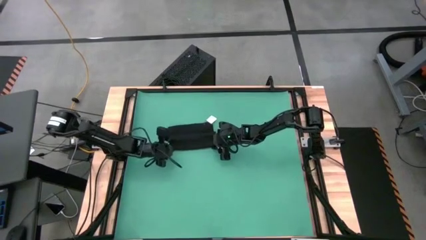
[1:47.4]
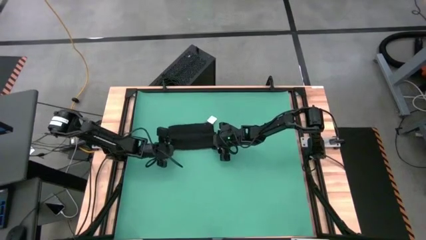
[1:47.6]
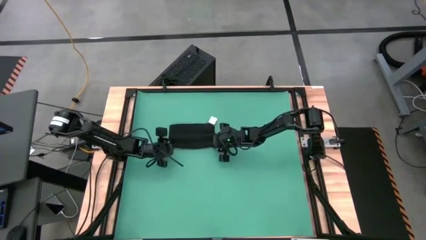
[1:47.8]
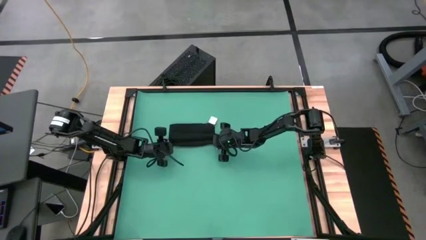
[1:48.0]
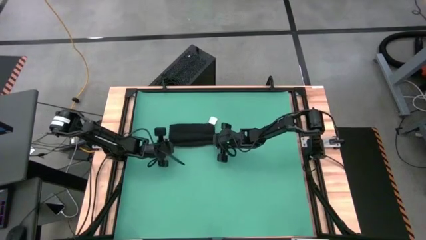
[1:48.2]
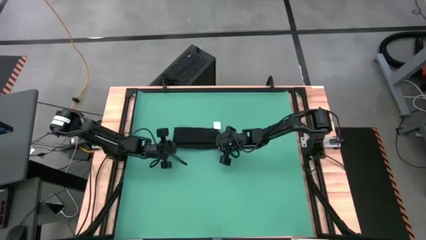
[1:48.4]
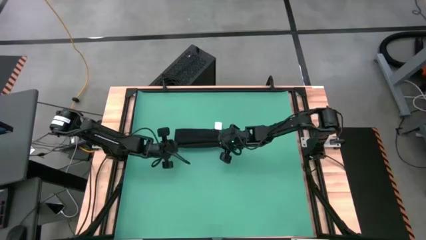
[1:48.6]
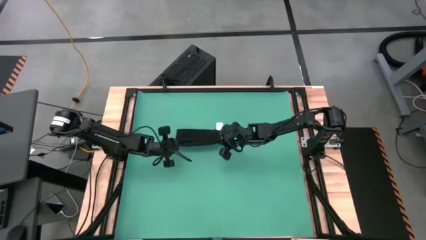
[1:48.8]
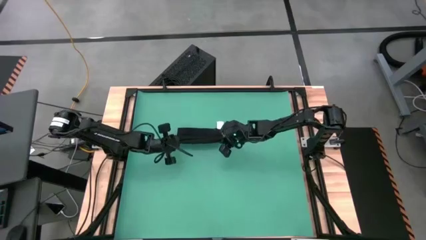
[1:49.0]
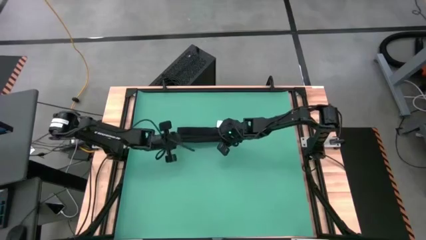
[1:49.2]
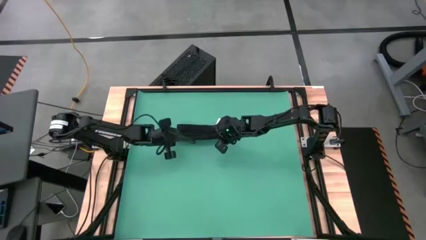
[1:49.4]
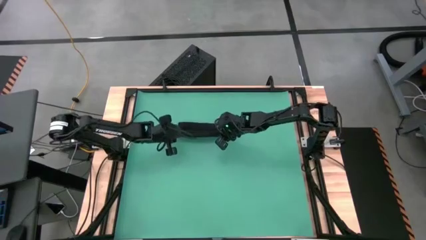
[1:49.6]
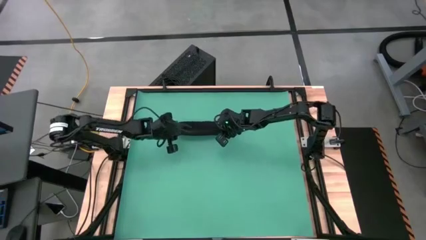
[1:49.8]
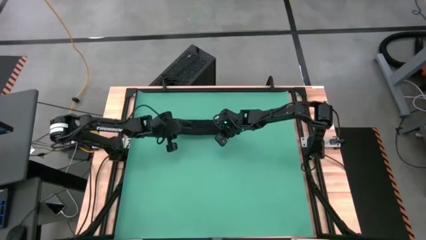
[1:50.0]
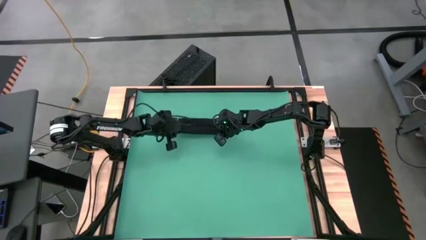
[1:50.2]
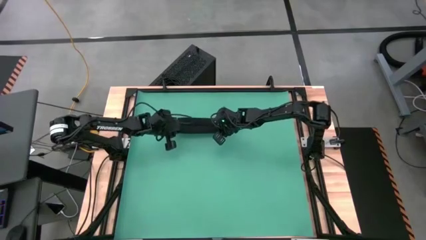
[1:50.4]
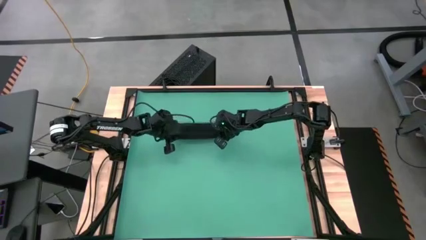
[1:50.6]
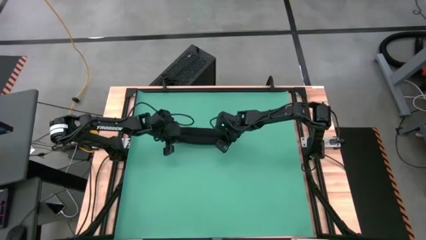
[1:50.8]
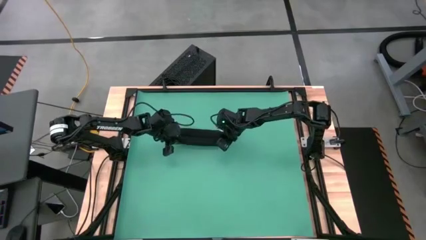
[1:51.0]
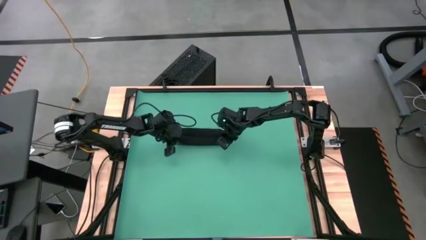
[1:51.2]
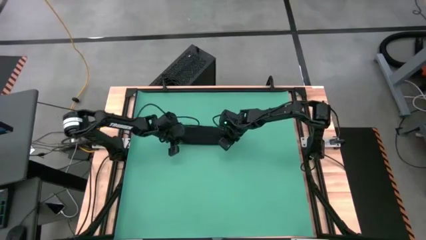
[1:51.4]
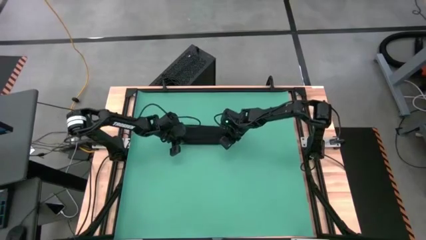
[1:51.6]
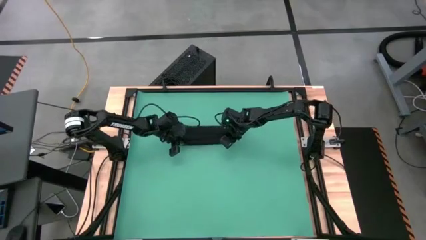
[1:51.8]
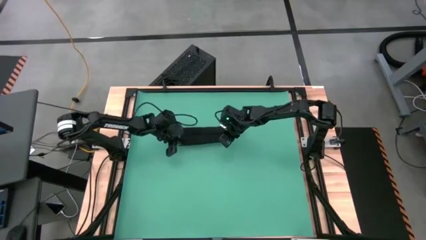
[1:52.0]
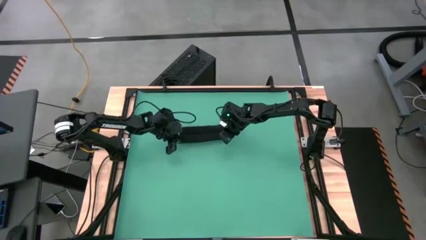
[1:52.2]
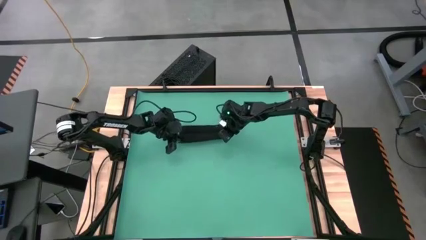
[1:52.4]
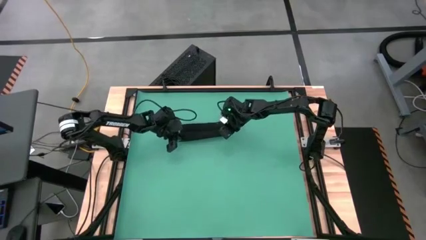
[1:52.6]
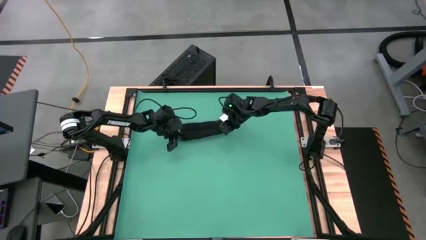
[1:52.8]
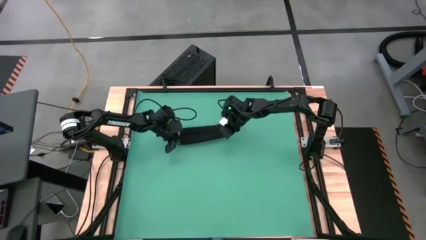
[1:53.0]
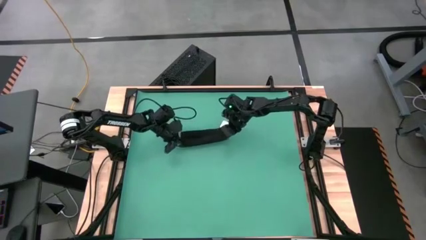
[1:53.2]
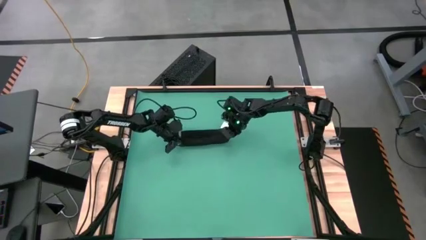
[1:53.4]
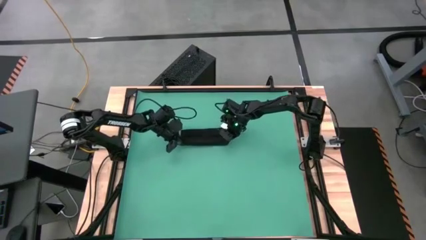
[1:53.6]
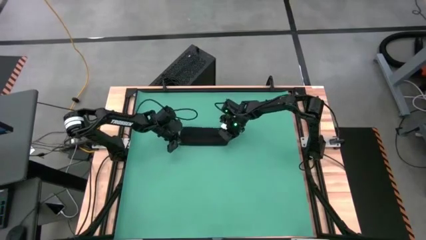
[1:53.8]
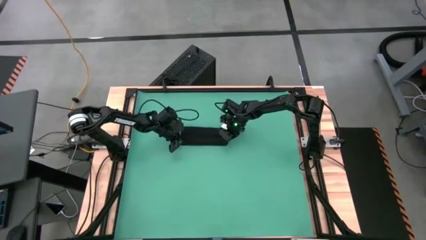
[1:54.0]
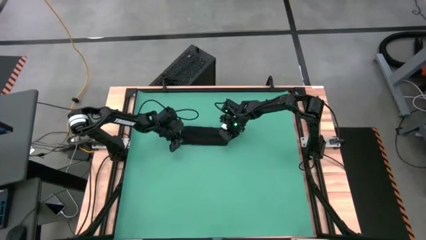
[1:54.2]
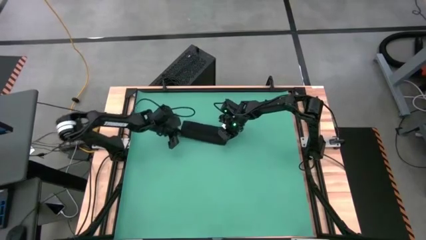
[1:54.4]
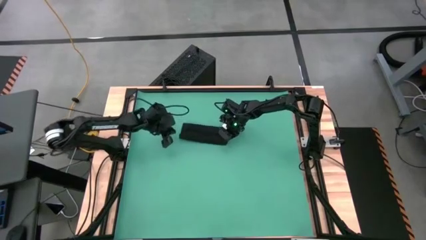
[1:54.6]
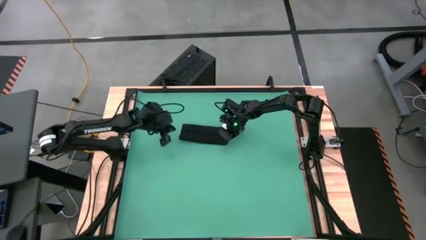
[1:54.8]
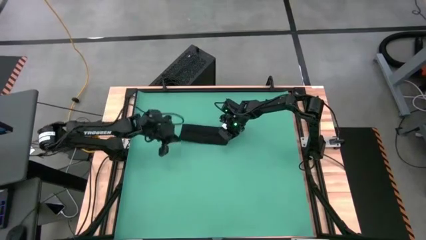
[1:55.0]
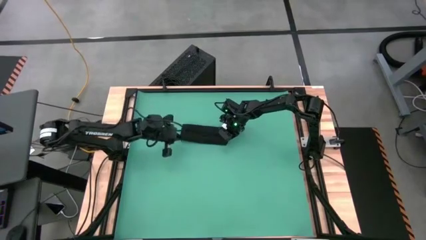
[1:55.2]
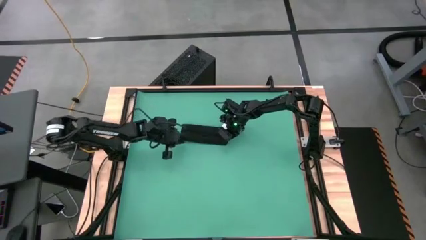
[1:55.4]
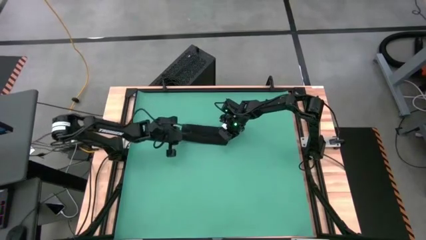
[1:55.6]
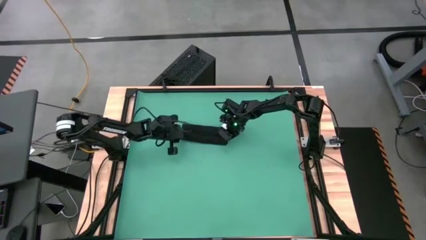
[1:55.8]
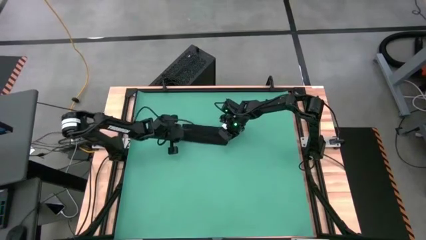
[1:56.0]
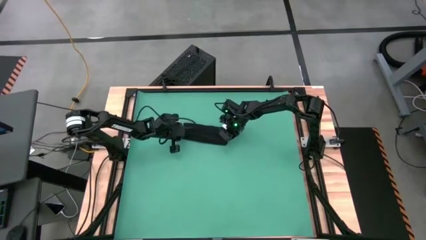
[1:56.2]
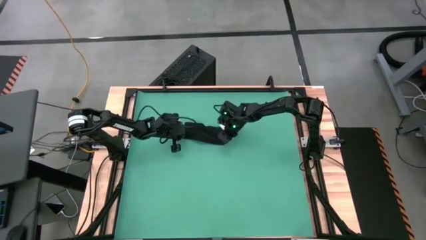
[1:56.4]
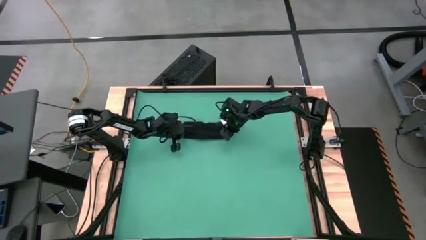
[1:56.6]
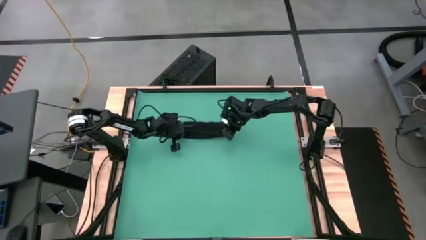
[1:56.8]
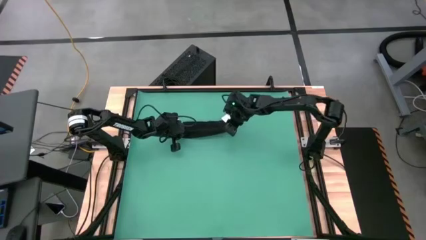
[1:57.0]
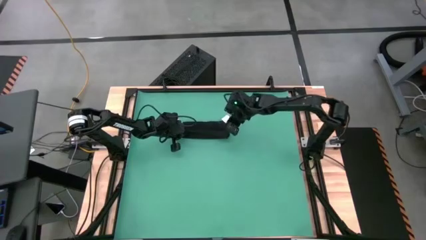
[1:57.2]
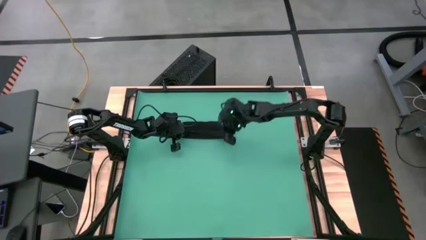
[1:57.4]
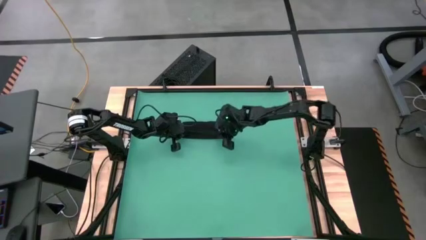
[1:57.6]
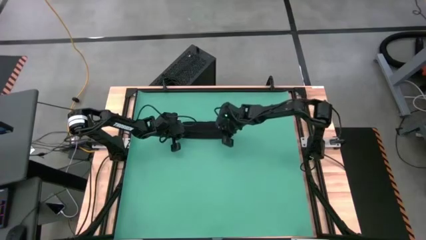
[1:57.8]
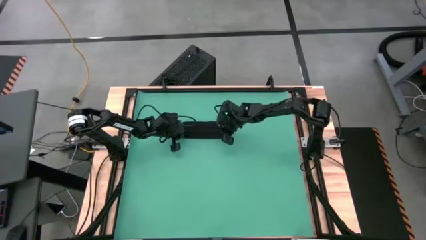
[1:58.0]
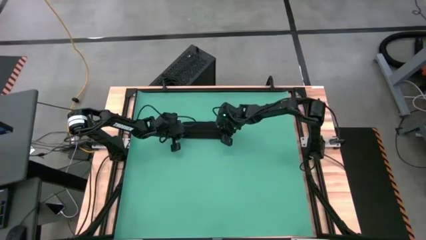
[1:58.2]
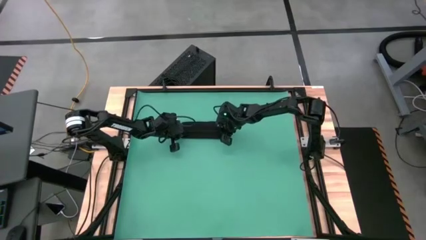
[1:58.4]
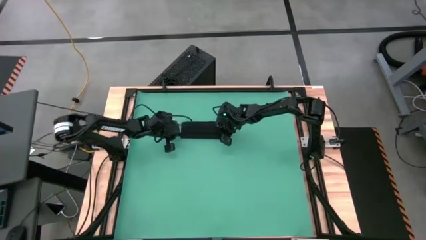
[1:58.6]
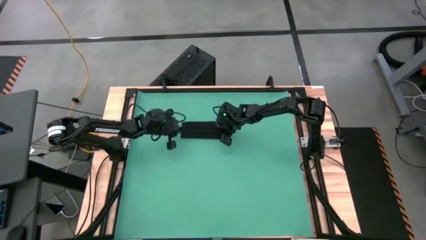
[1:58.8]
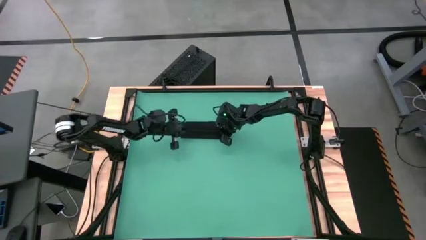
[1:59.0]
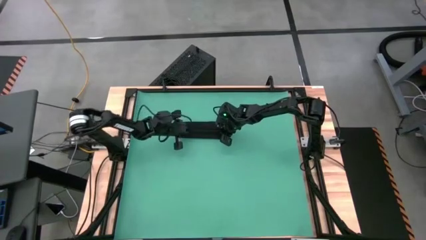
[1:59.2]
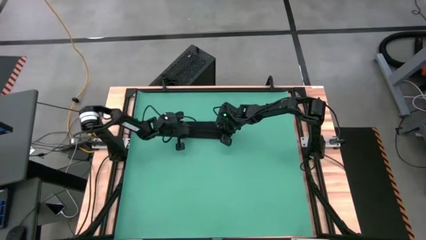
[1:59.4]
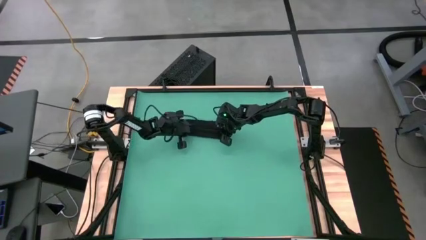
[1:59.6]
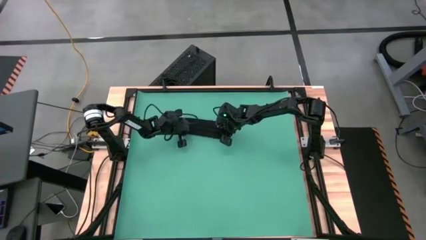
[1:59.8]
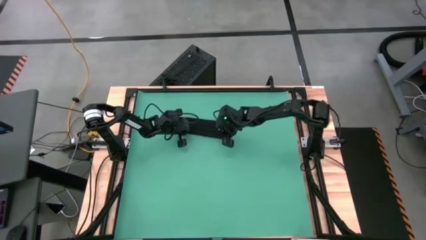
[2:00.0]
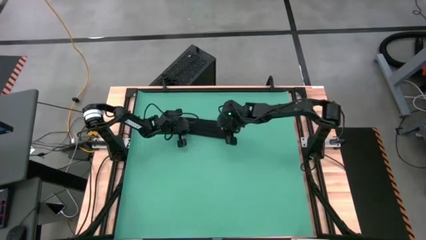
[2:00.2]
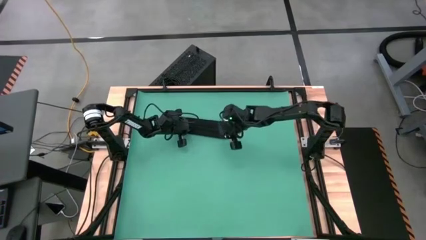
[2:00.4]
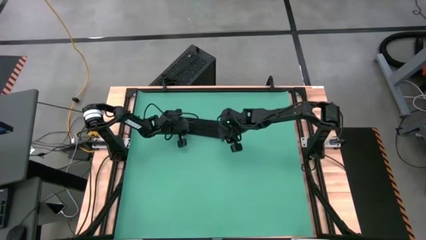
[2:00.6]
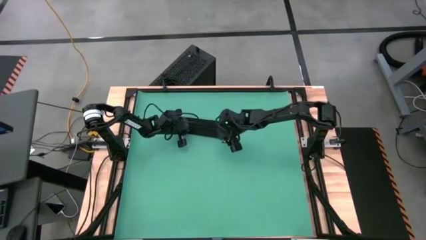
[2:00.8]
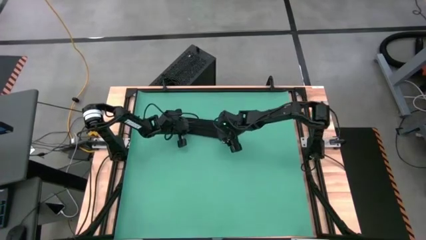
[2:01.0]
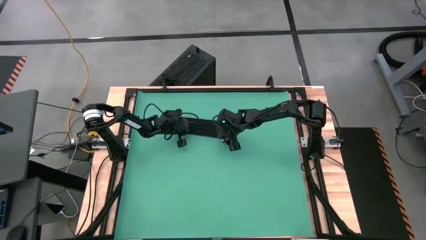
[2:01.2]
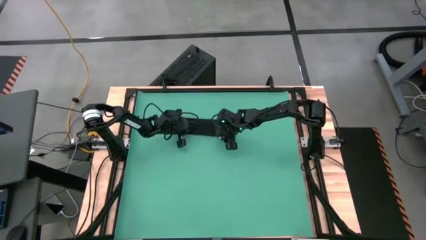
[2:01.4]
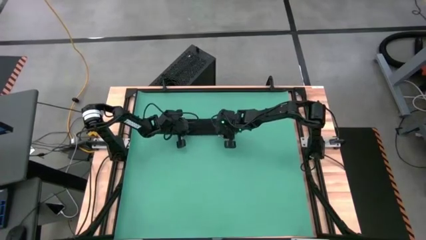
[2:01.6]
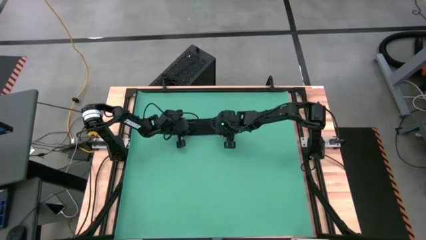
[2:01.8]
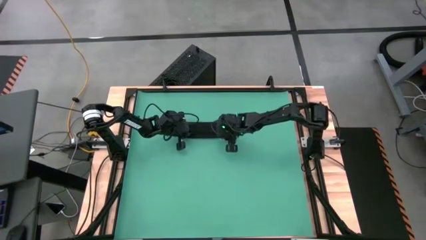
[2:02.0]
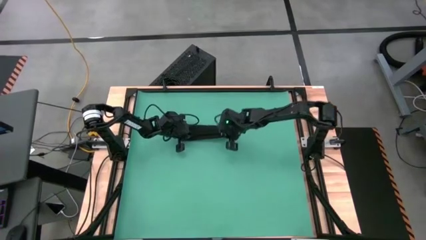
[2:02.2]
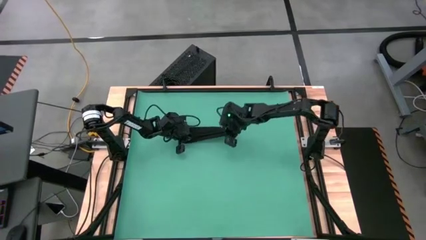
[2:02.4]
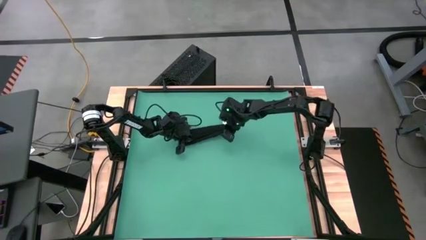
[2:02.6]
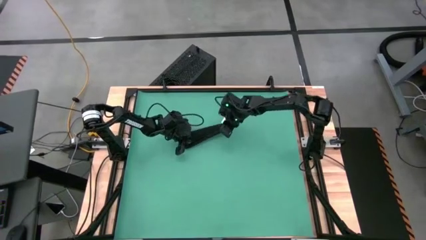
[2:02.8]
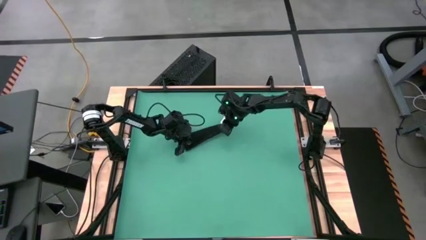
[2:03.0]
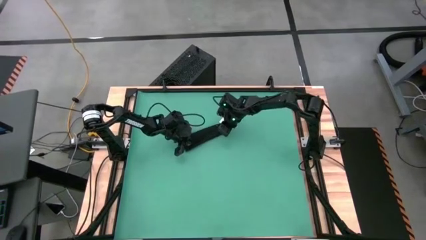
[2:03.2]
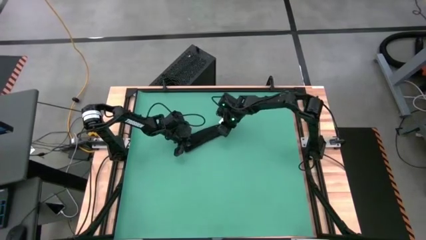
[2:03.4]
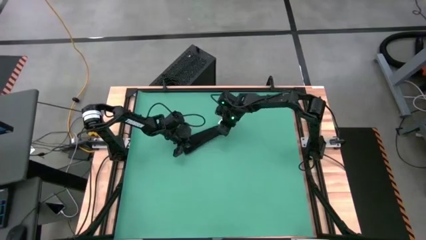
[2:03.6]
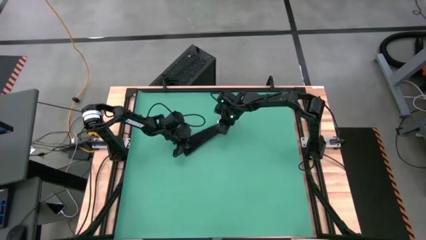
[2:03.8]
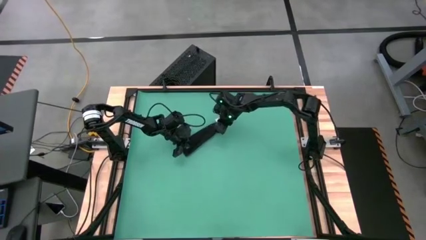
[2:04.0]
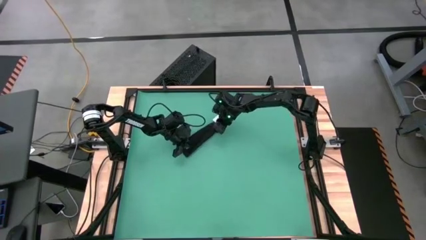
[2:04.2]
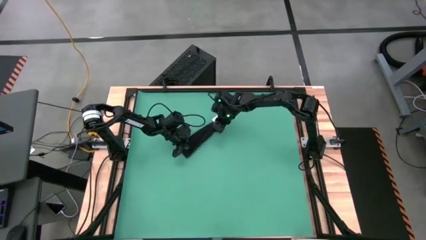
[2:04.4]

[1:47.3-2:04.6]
Task: Roll towel
Roll the black towel
